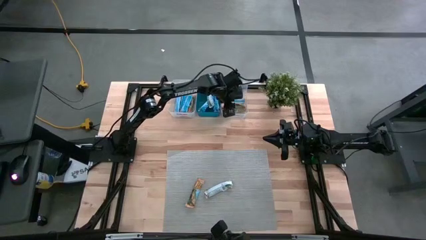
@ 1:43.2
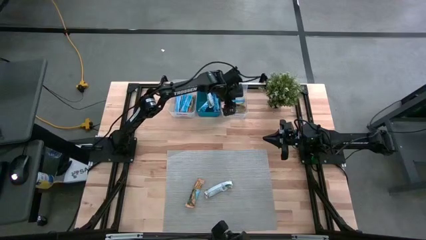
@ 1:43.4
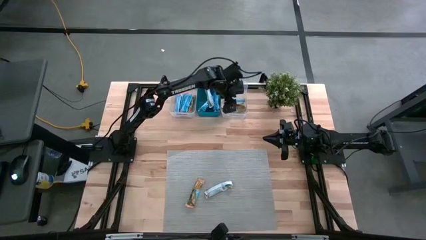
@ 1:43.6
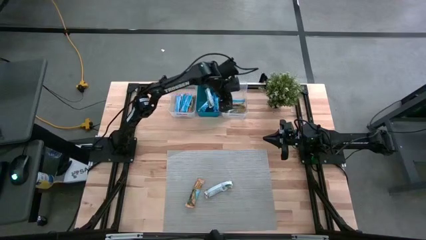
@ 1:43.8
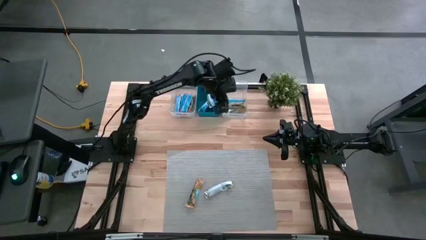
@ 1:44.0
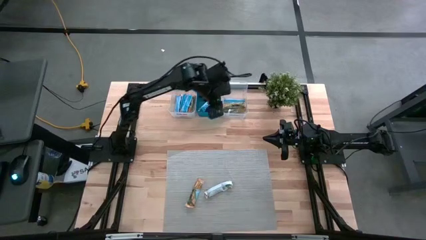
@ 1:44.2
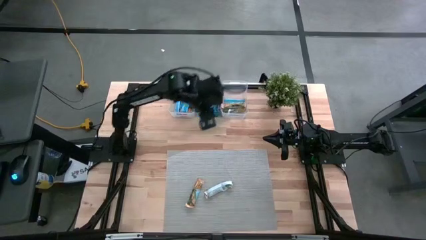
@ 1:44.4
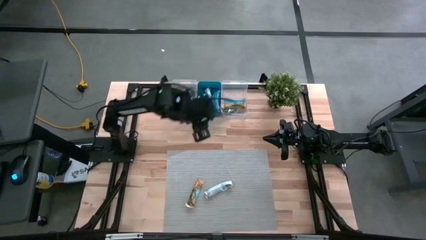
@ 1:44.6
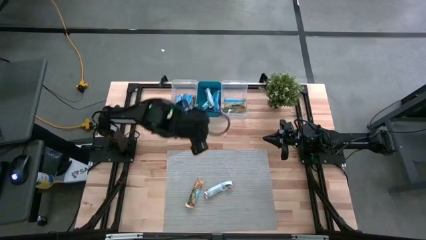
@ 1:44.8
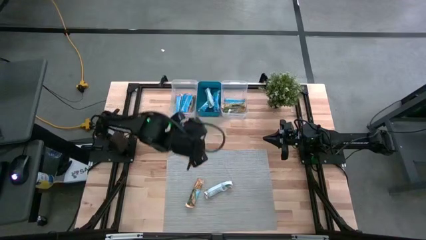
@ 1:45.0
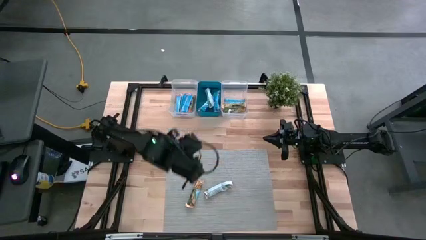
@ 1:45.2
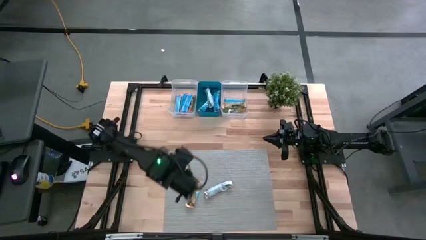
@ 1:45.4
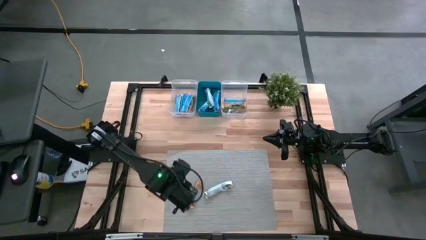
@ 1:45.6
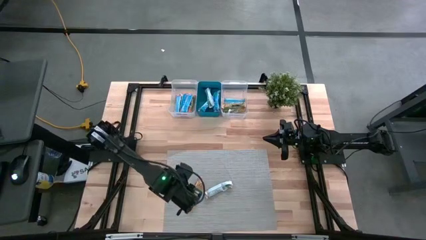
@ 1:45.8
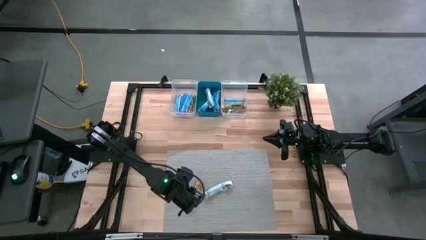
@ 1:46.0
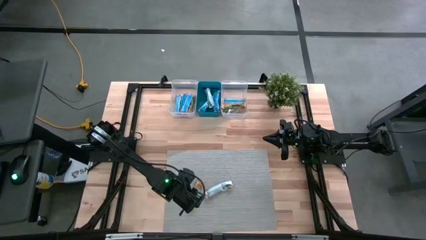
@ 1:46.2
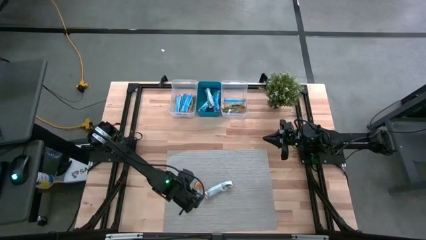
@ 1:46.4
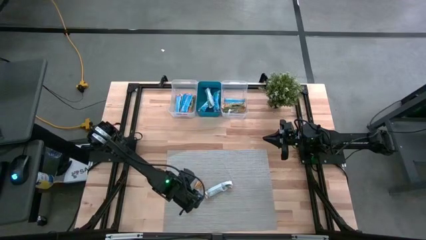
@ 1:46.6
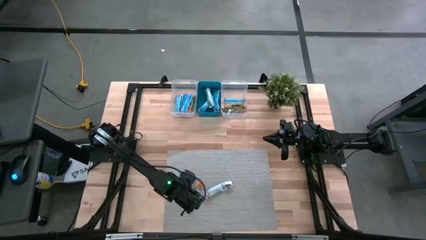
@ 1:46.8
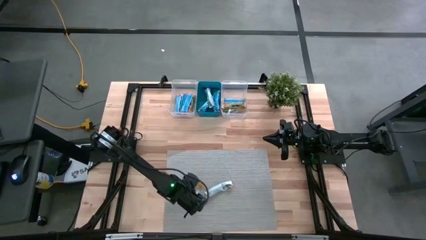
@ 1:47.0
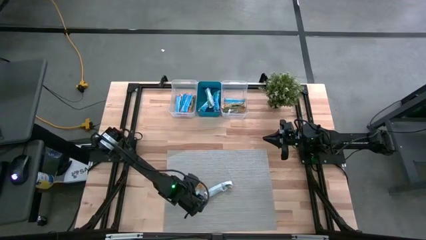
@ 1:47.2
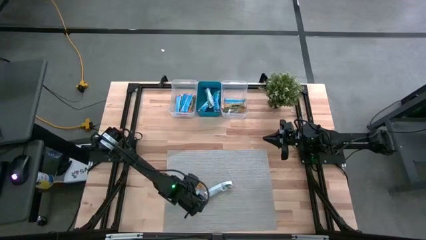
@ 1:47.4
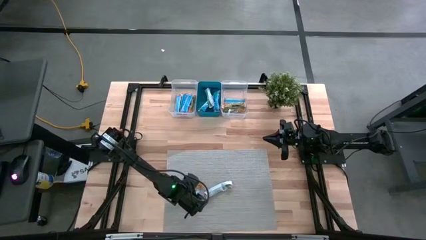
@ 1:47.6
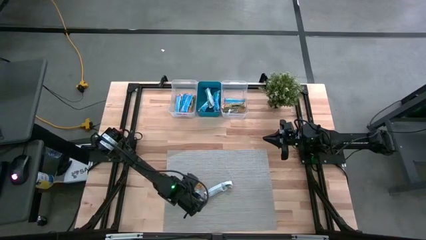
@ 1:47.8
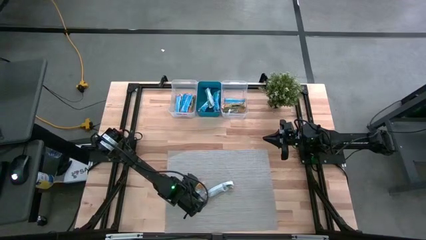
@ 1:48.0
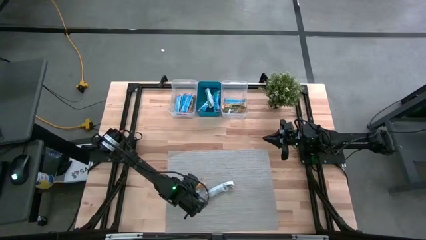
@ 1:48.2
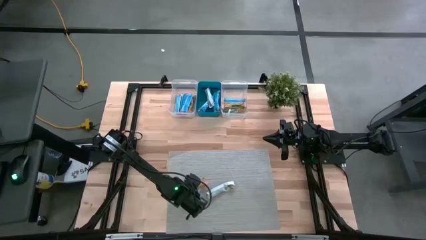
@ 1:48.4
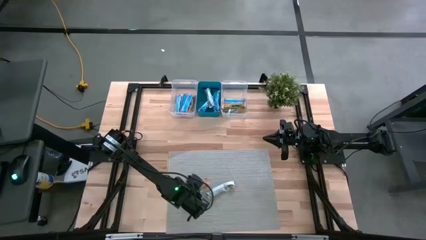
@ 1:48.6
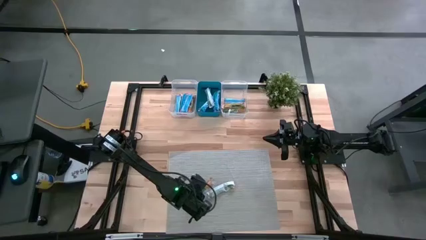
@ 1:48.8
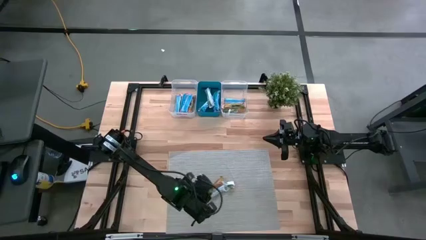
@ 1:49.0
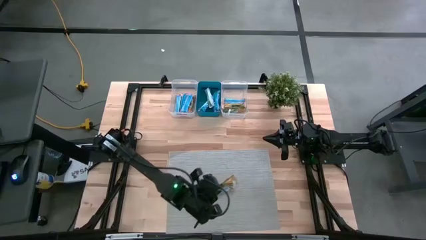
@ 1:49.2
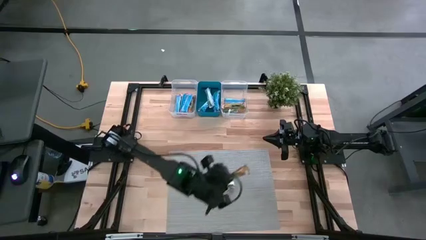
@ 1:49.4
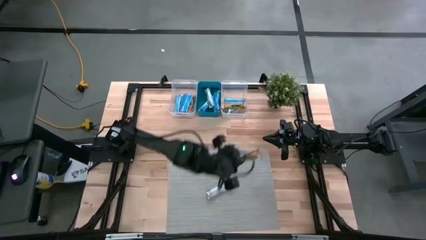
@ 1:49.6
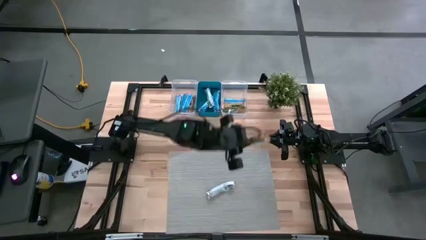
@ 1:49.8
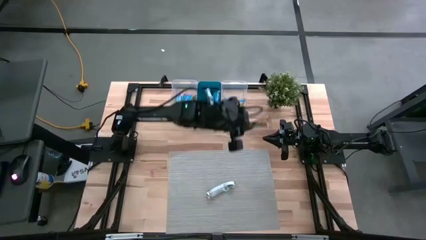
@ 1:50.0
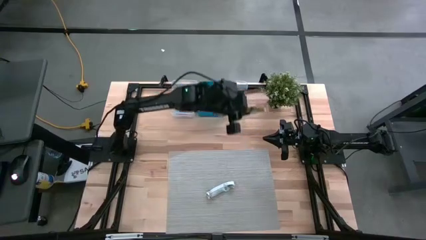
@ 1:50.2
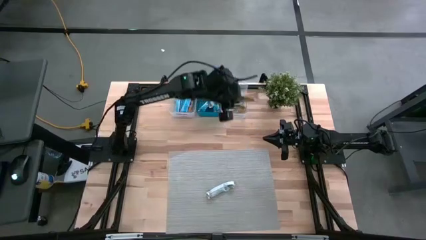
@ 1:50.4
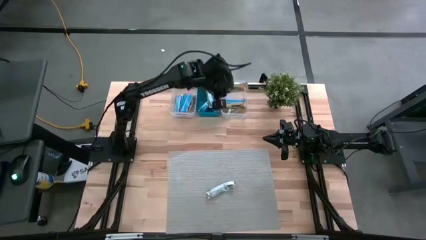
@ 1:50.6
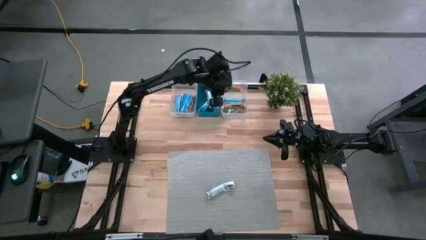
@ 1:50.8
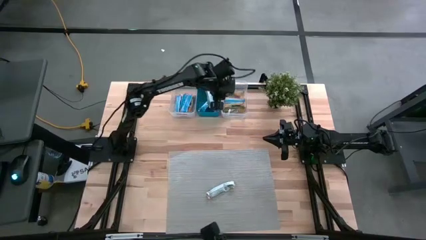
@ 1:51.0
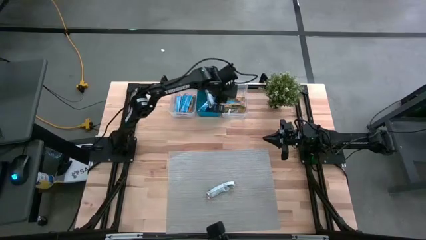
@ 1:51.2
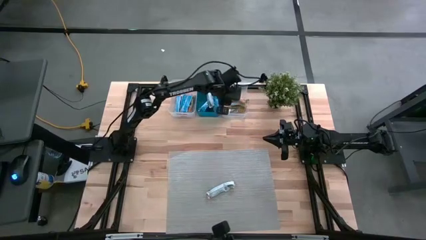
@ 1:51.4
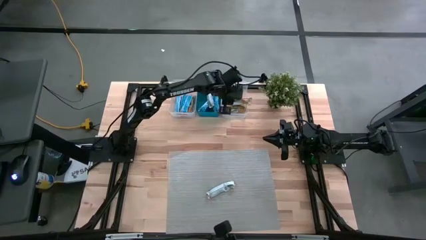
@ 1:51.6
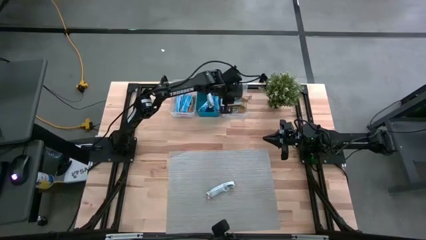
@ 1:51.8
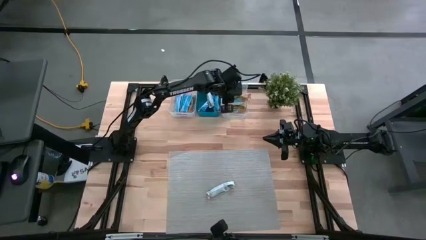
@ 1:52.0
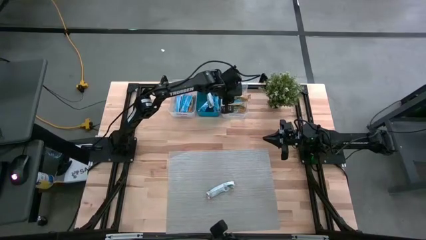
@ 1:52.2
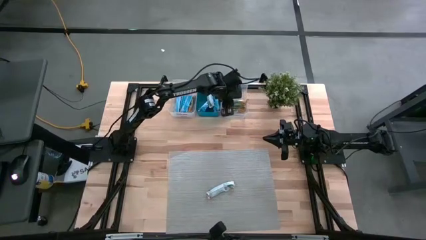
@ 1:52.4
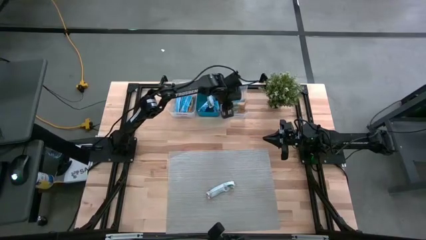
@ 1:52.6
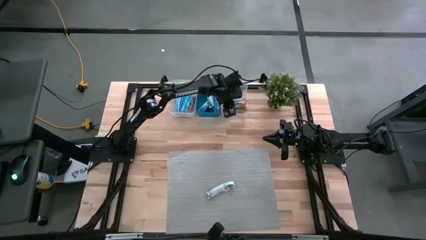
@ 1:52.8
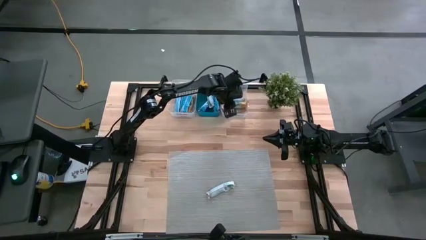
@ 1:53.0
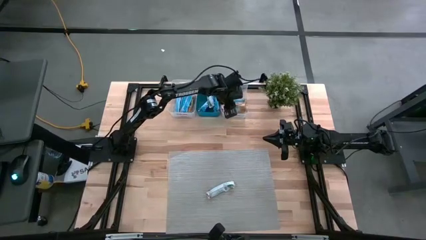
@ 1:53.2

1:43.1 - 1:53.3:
Task: Pick and place Granola Bars by type
Put the yellow granola bar into the right transparent bin
